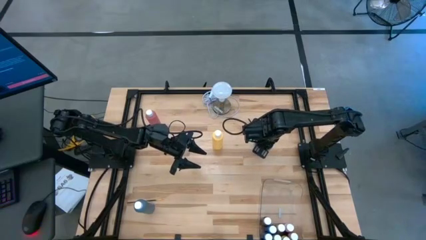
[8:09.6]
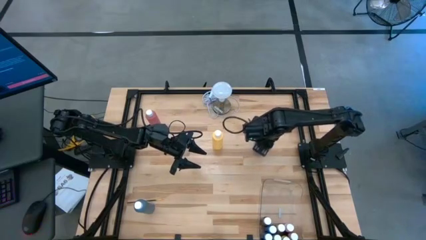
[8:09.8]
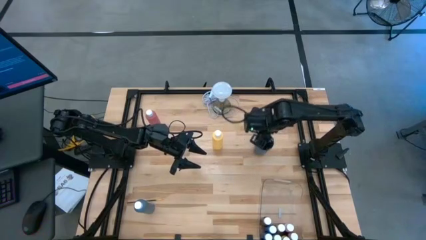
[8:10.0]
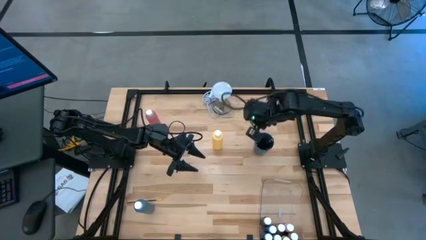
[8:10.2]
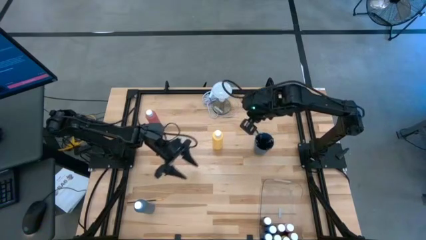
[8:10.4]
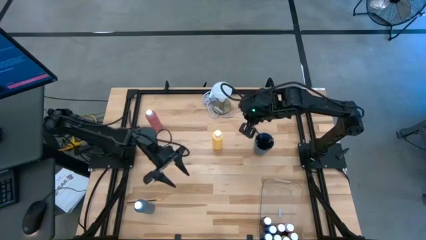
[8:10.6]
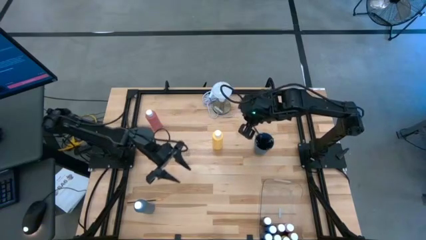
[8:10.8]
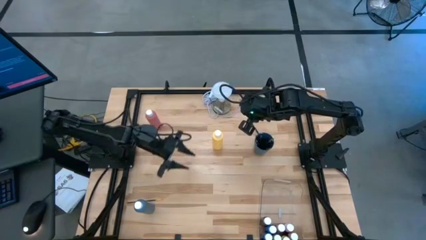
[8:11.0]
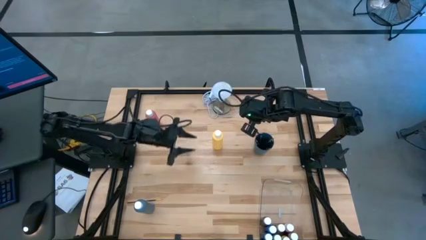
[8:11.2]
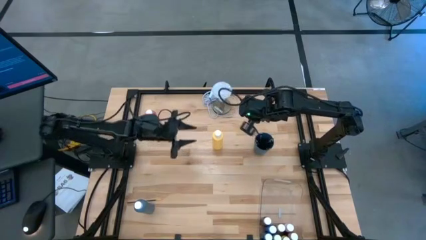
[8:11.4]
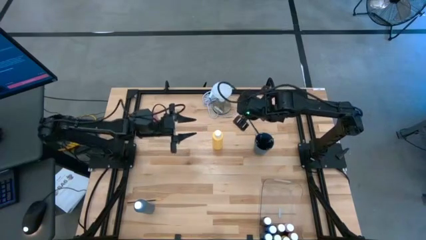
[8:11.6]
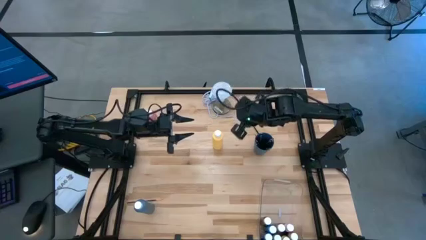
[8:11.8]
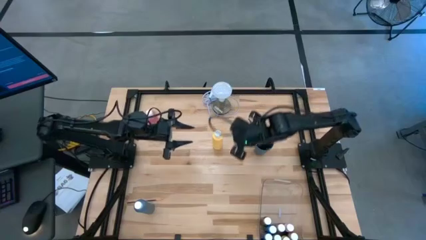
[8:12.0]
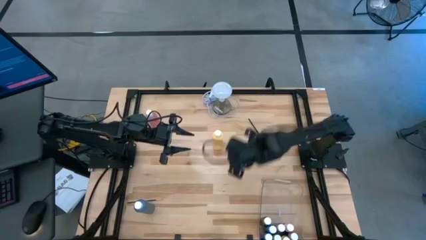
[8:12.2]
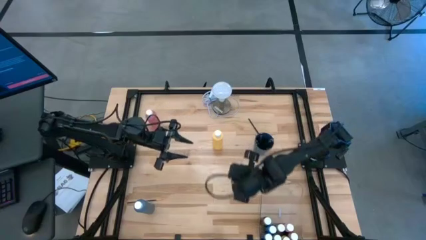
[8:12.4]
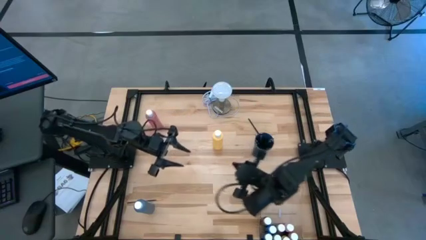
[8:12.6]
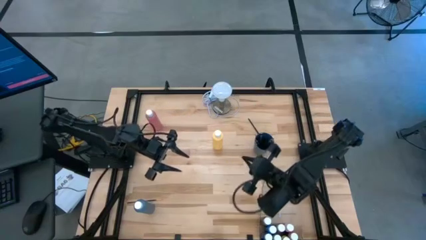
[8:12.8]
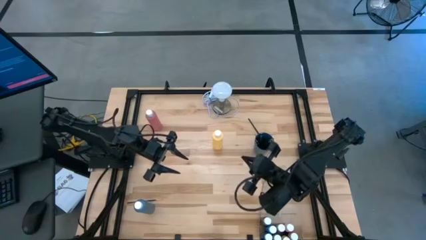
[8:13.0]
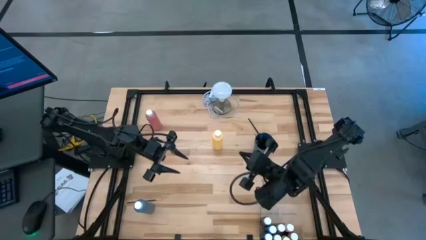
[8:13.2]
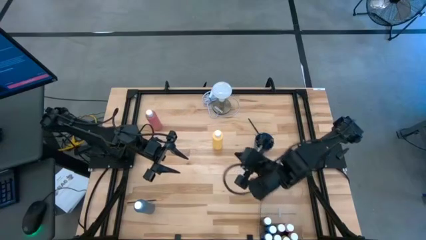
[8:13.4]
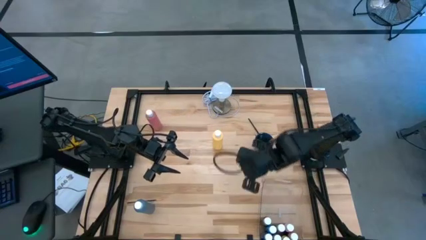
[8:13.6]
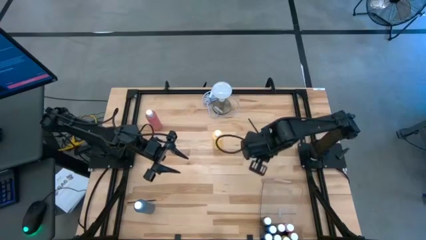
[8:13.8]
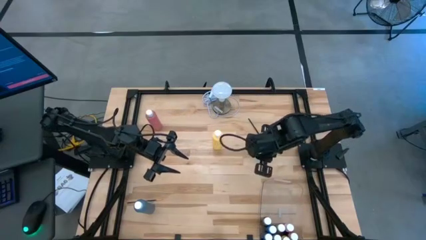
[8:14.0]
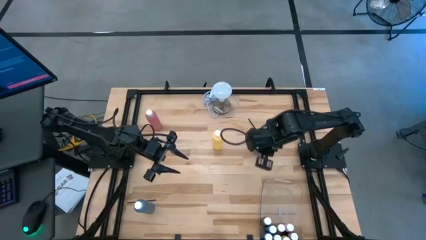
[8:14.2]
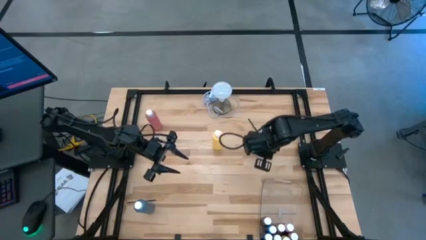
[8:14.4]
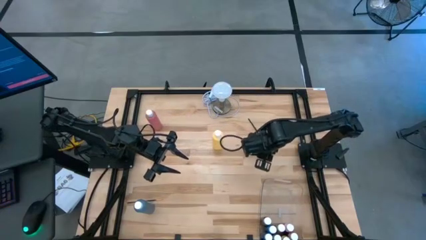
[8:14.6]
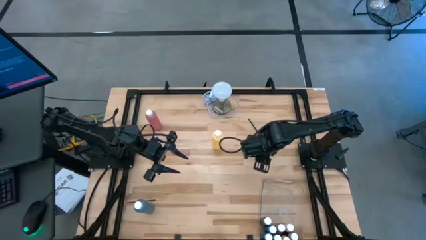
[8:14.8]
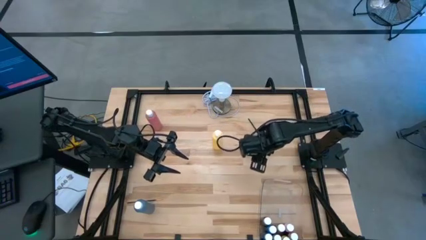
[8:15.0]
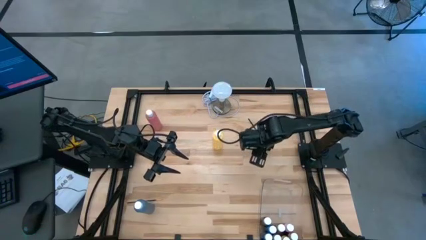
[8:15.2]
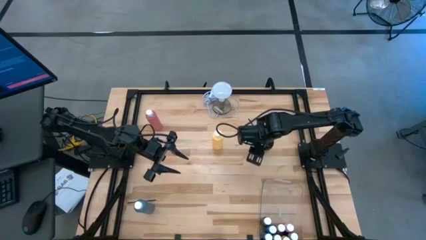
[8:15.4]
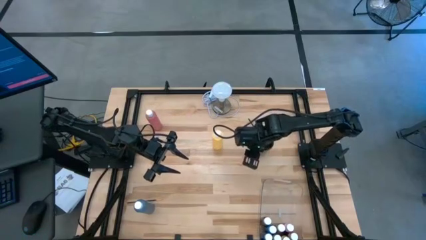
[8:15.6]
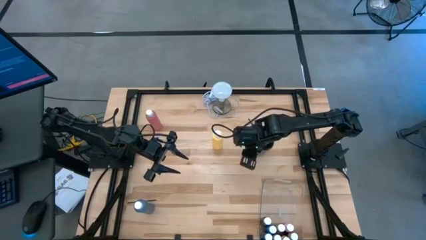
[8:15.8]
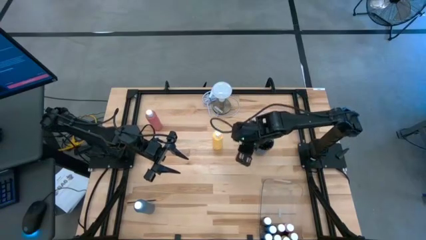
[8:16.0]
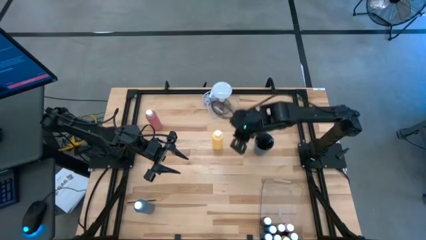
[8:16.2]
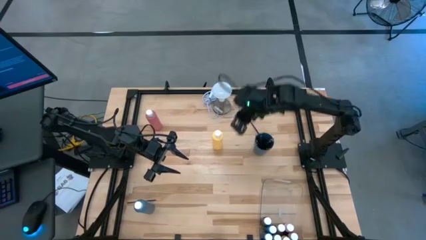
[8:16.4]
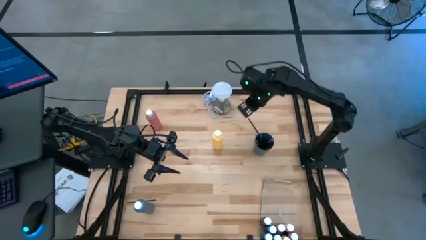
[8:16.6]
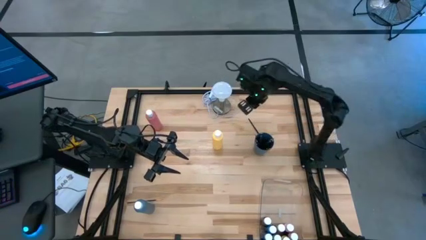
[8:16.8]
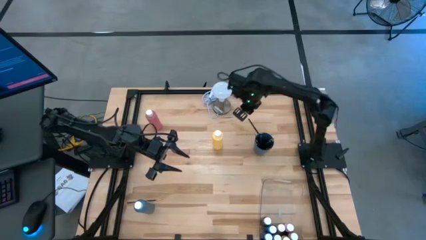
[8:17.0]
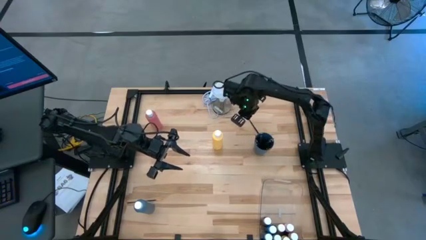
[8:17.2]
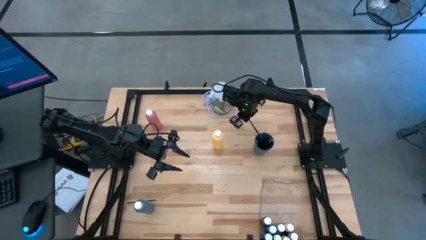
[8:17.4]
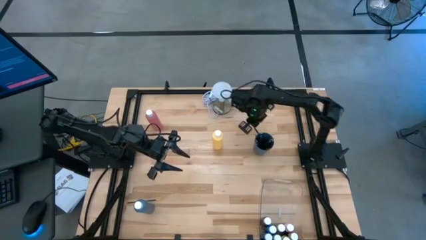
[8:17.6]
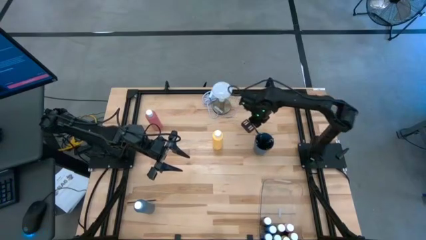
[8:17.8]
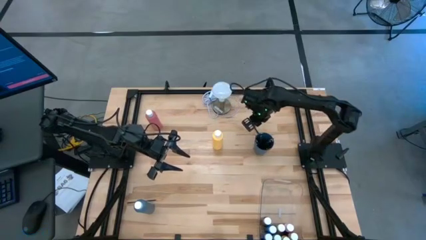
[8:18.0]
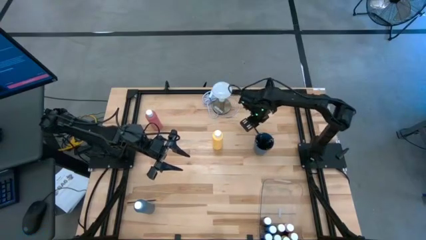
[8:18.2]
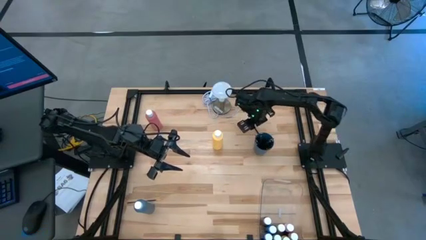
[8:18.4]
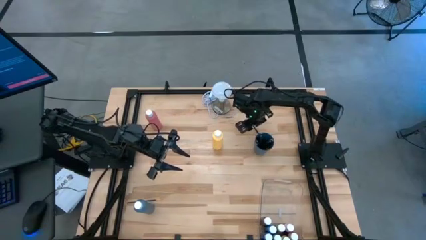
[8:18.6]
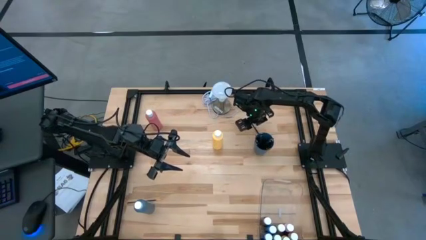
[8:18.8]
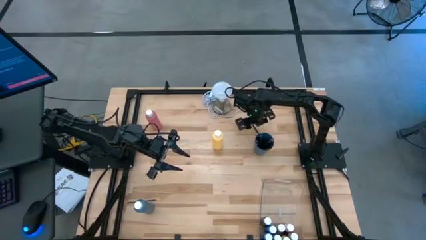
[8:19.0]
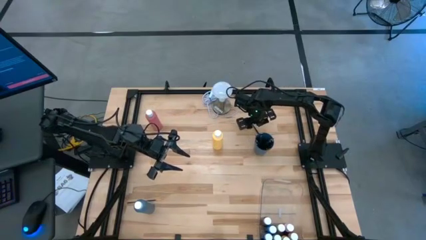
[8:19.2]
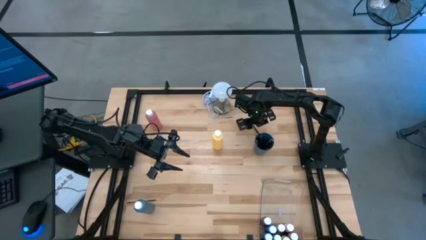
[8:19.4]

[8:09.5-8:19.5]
Task: Pick & Place Paint Supplies
Put the right black silver paintbrush into the blue cup

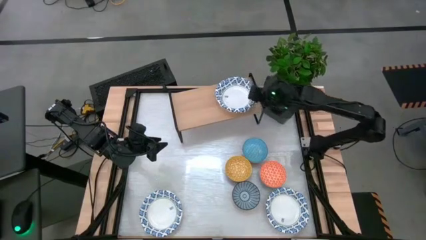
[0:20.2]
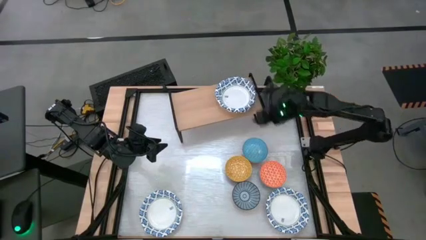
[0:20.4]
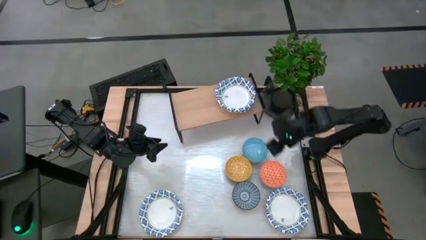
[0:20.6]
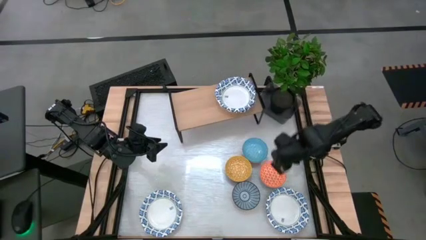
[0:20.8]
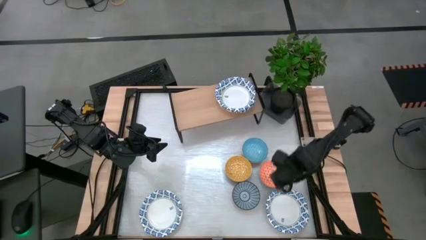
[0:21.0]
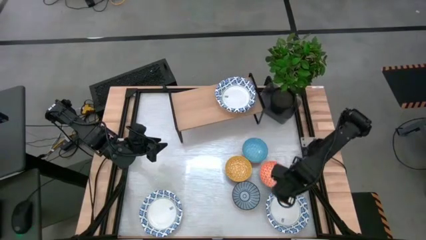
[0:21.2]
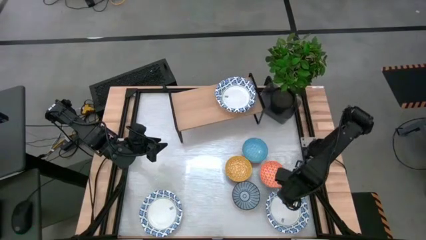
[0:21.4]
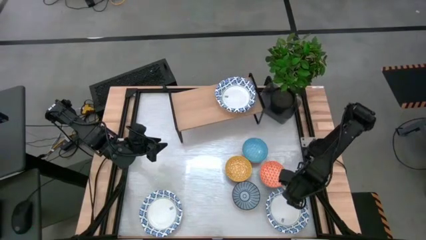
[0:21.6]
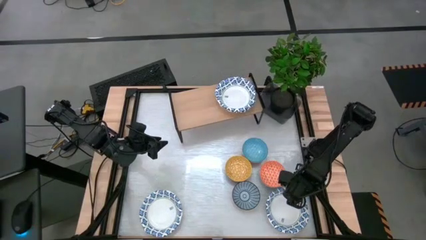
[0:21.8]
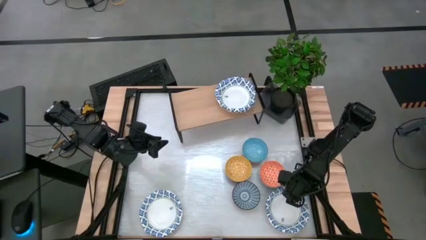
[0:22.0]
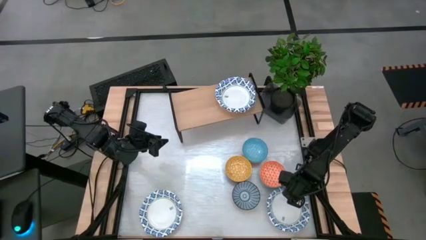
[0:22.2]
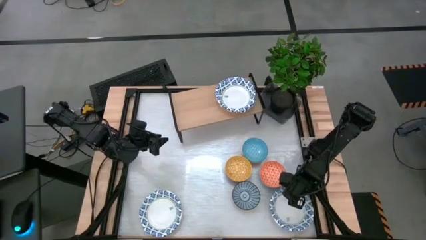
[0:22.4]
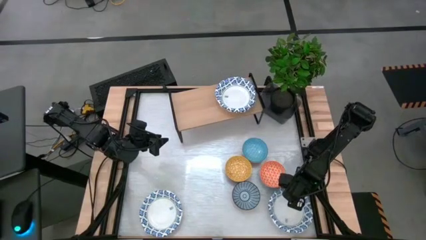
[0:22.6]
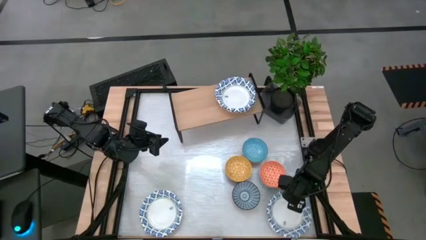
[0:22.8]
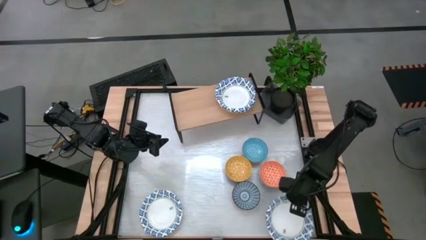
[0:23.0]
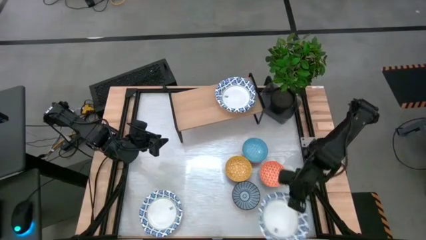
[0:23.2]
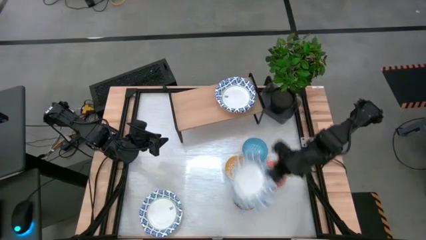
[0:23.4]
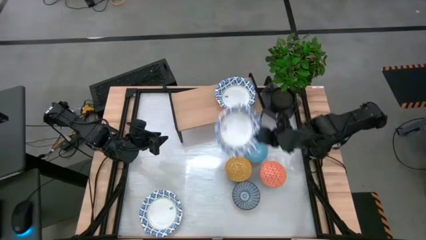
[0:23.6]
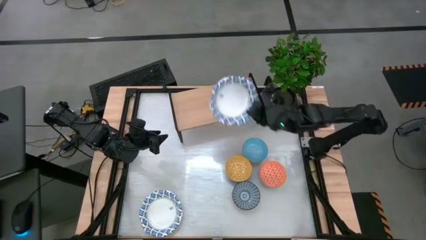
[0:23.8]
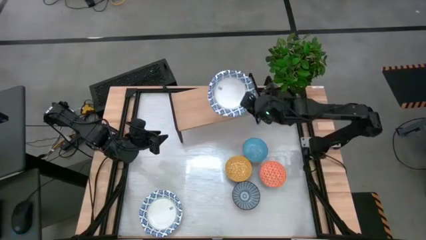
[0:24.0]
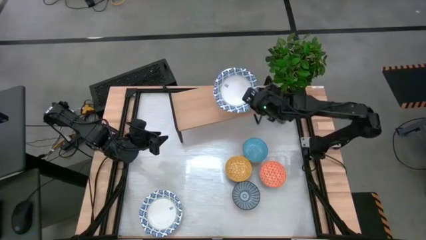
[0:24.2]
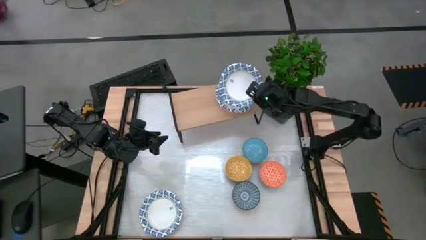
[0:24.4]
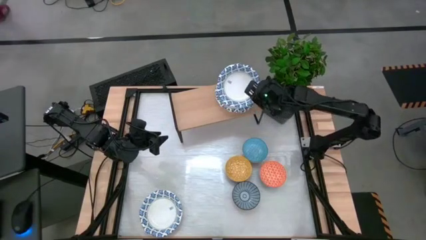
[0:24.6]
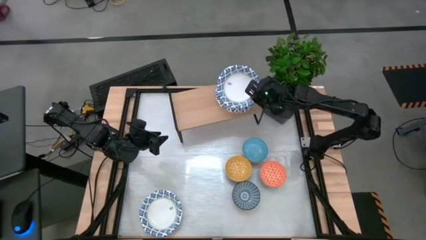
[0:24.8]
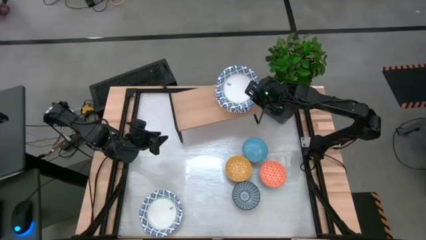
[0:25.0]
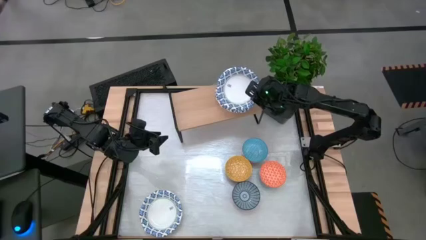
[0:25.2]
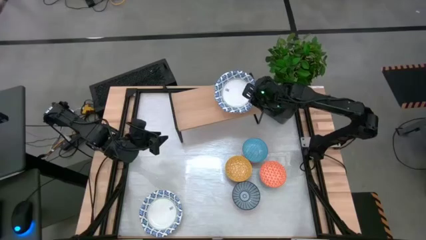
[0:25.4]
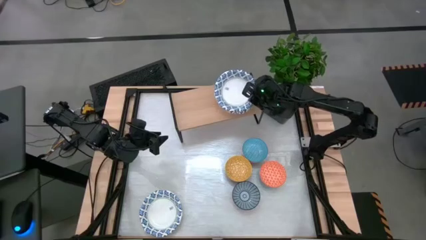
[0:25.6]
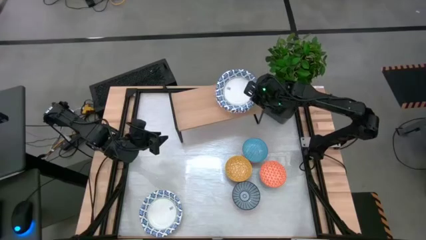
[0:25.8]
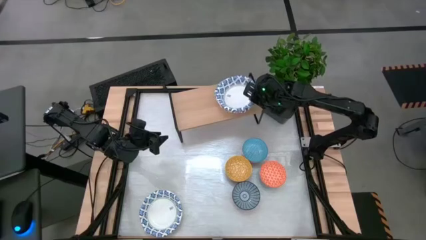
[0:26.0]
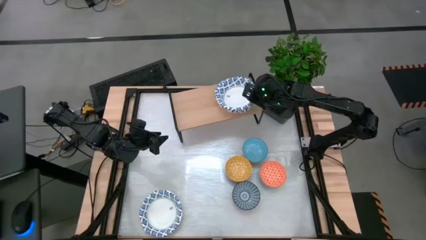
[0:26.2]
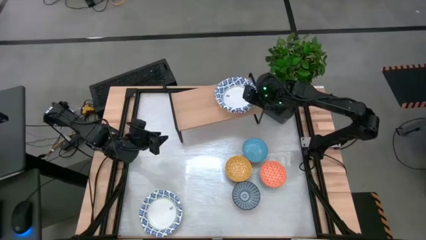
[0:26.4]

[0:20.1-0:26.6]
Task: Place and stack bowls onto a shelf
Stack the white patterned bowl on top of the white patterned bowls on the shelf
